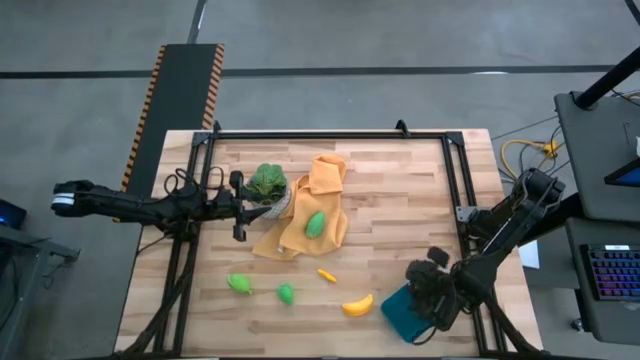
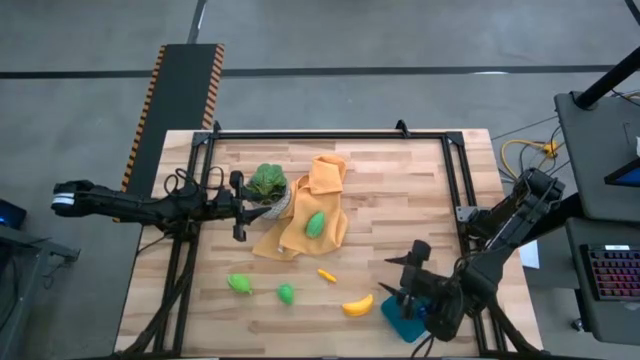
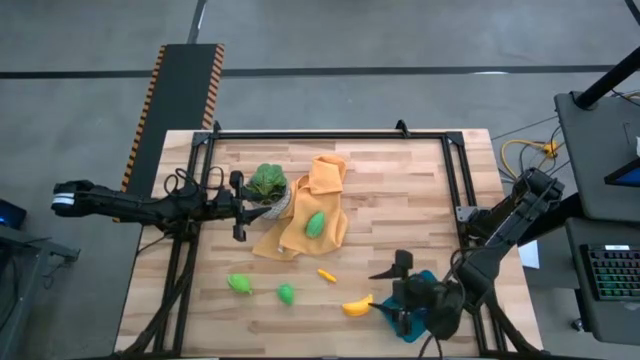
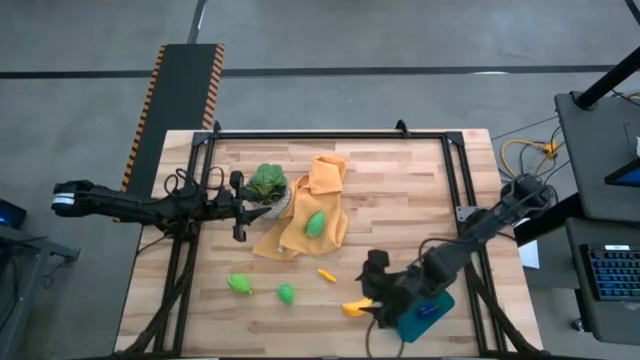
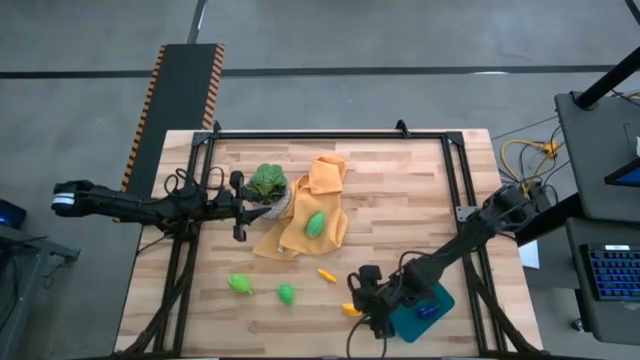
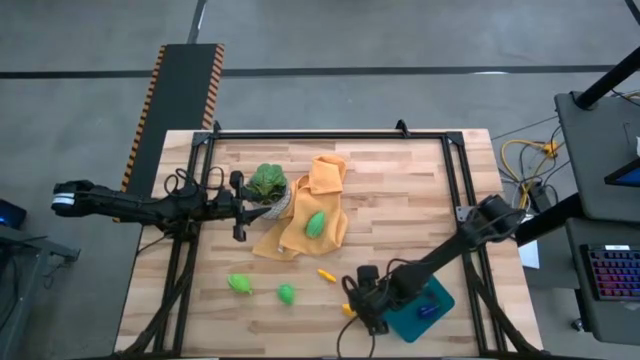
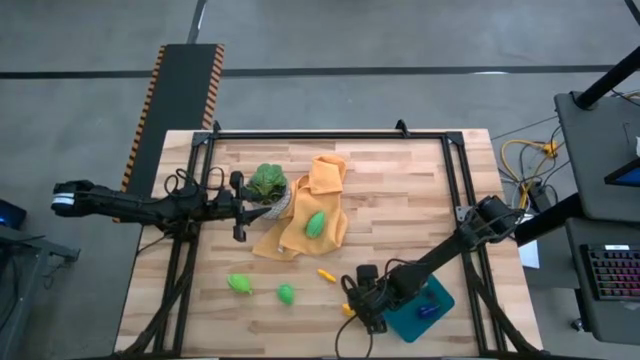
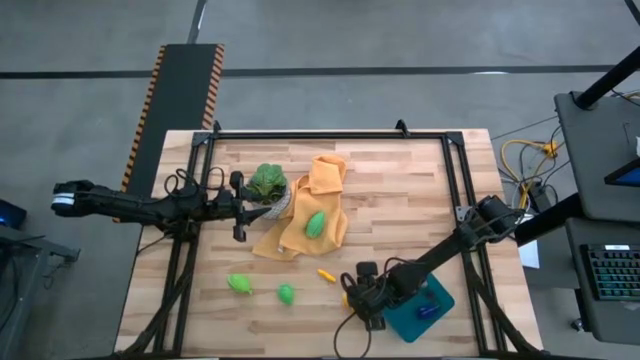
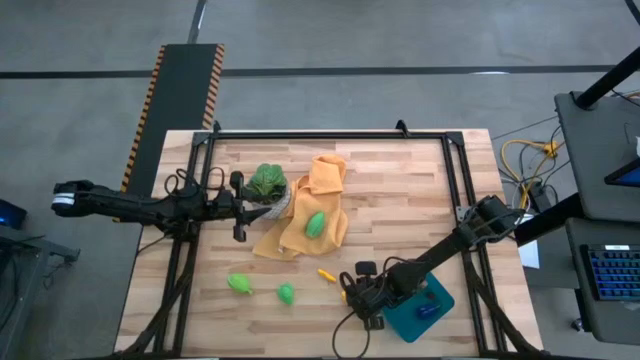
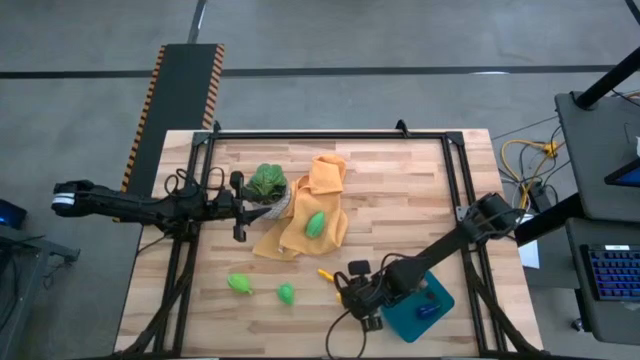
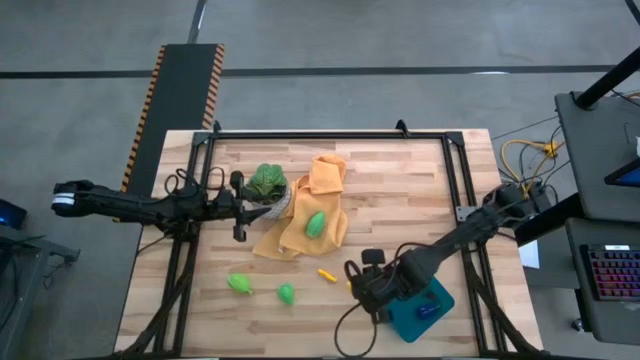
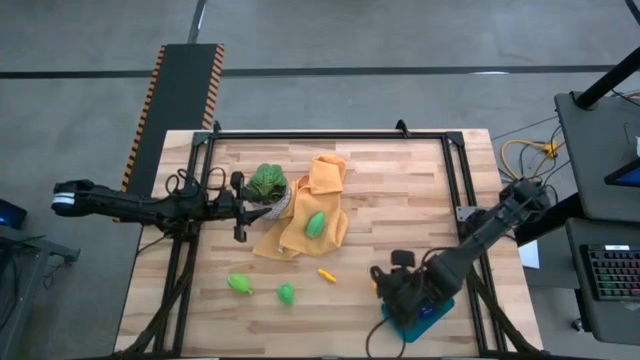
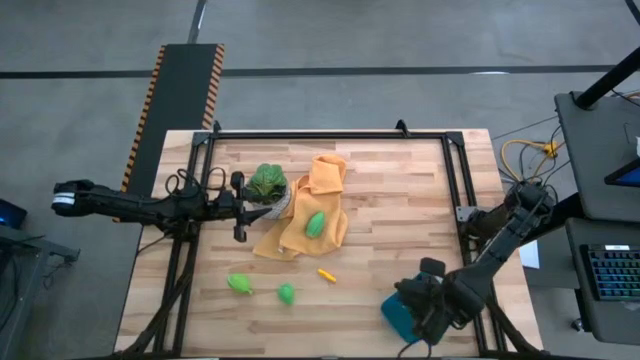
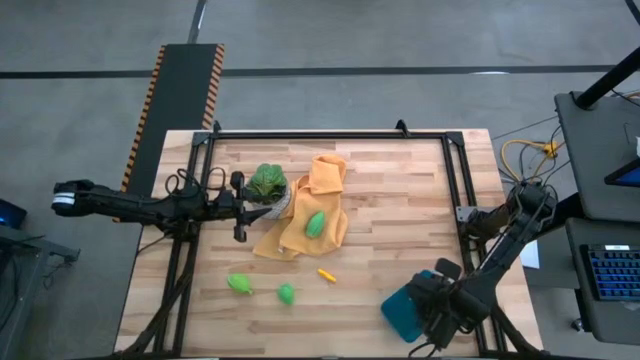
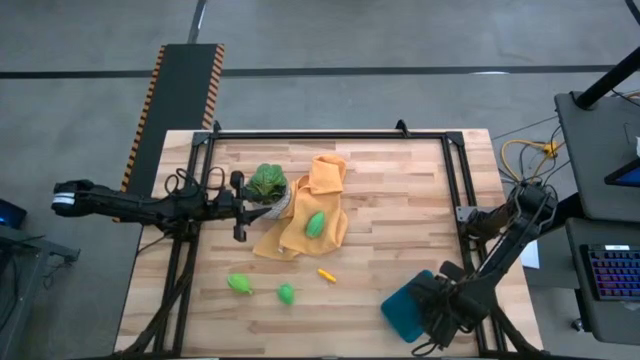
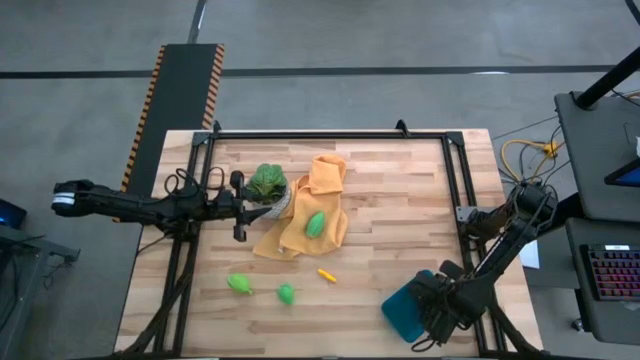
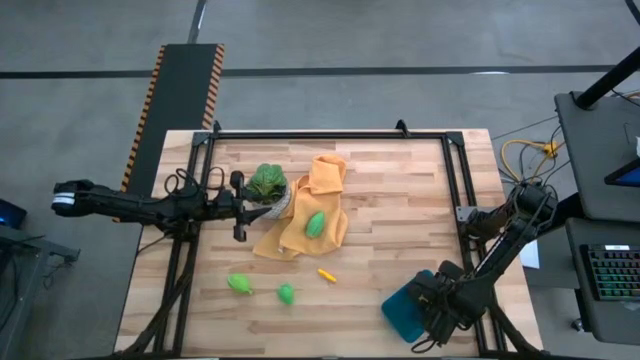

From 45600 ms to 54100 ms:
Task: Pick and placing Produce into tupperware
Put the banana into the blue bin

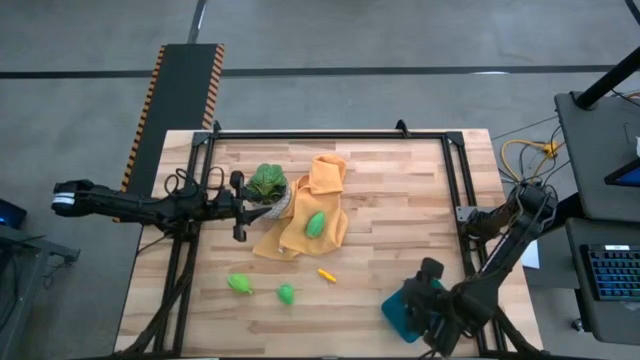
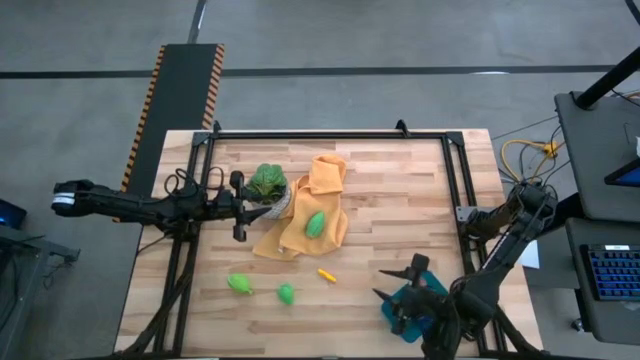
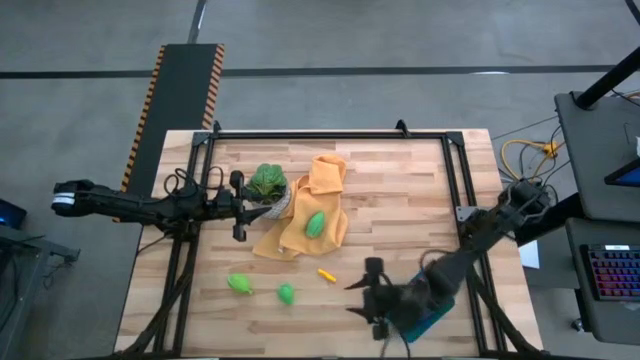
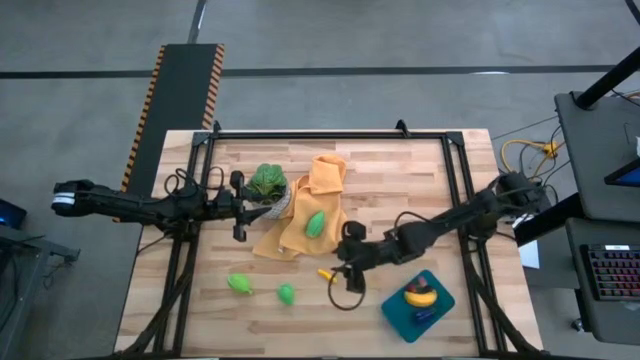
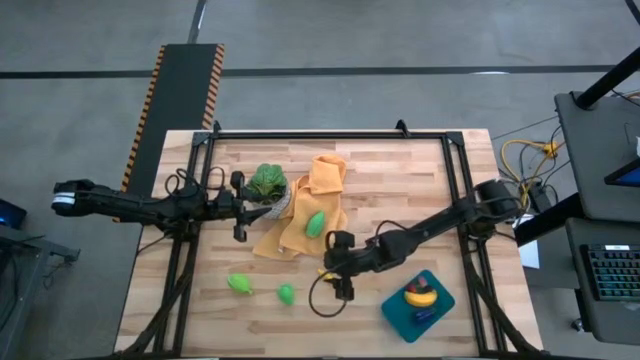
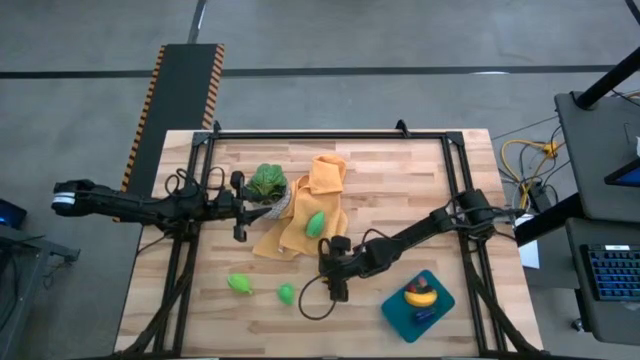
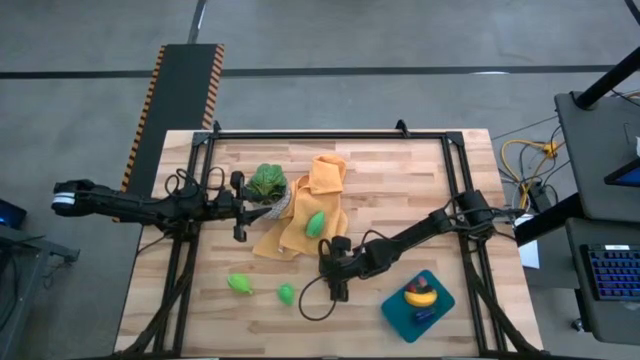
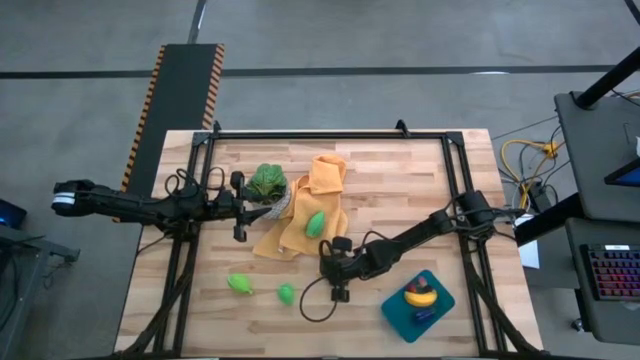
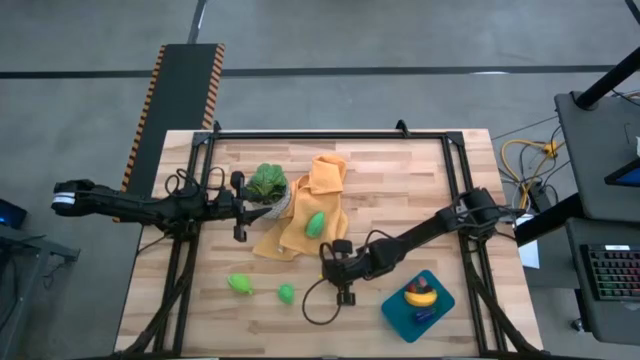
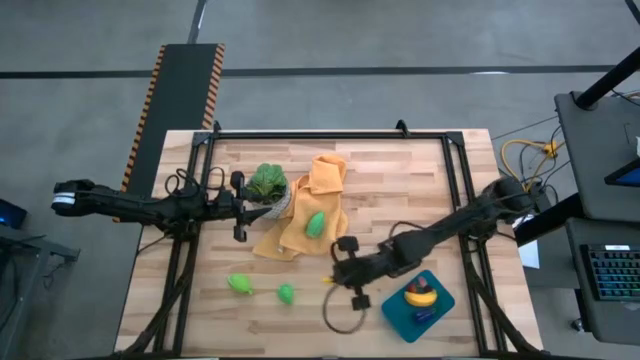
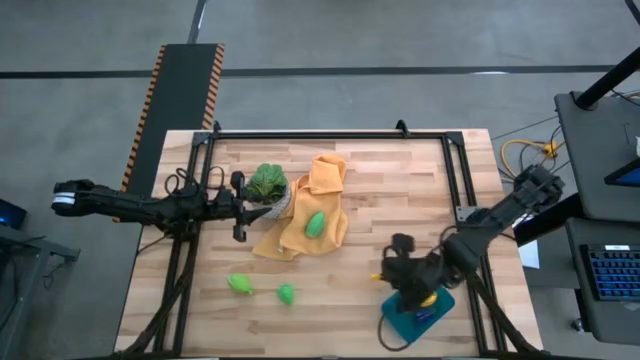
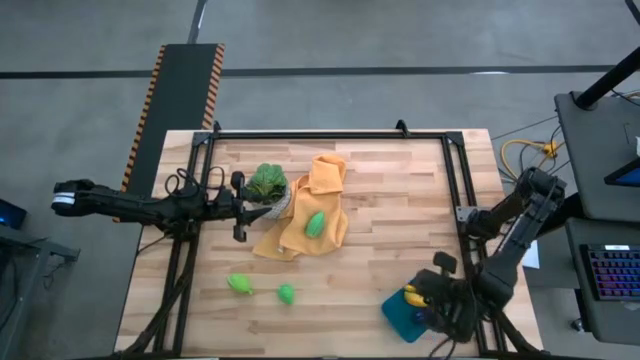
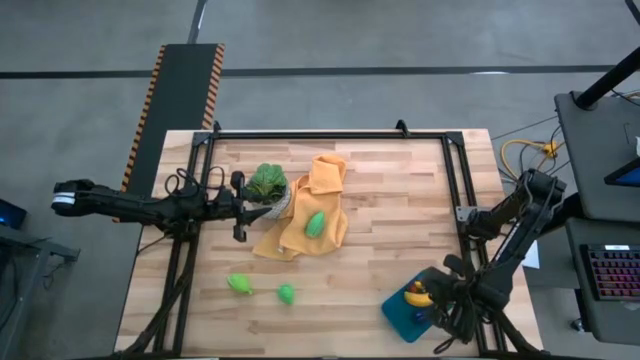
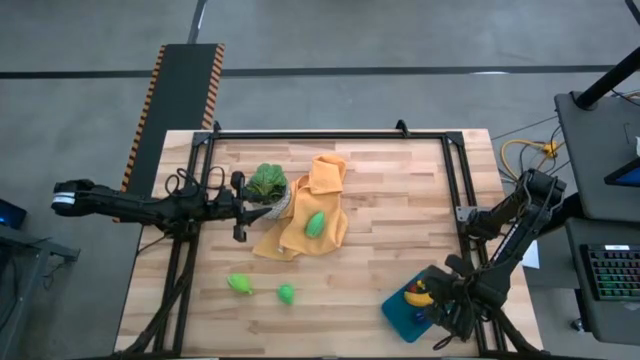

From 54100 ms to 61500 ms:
Put the small corn into the blue bin

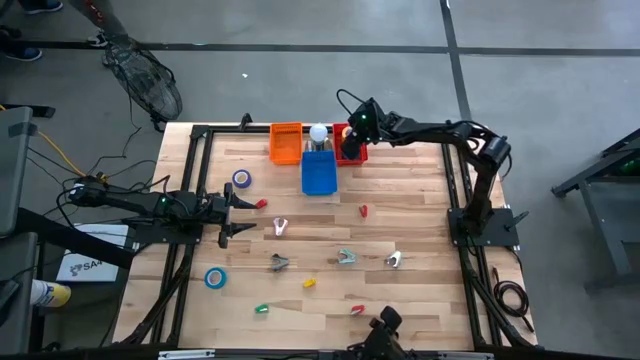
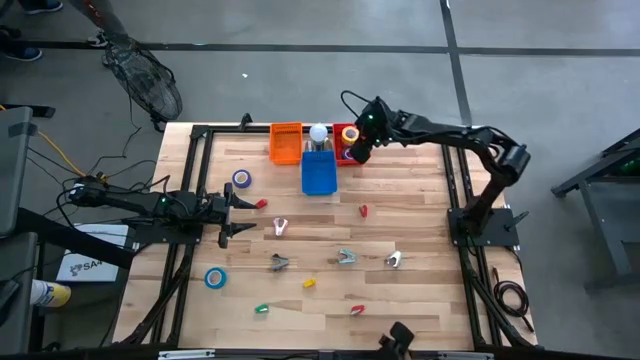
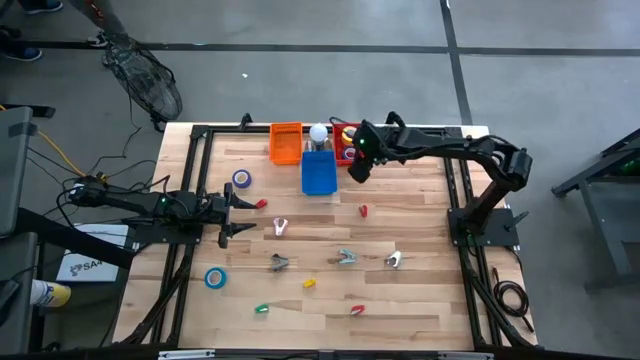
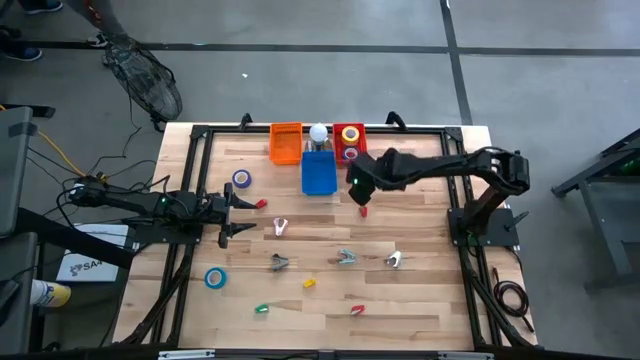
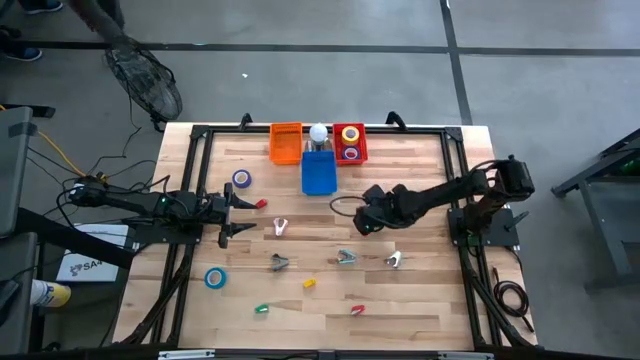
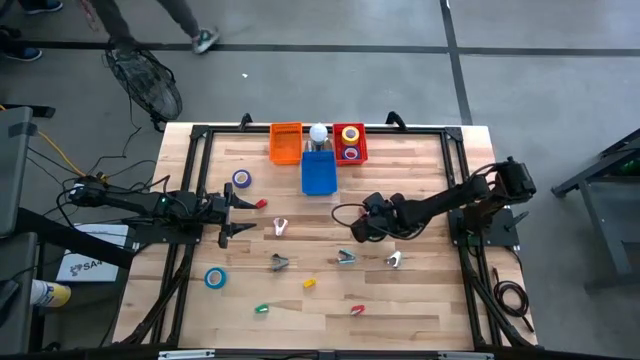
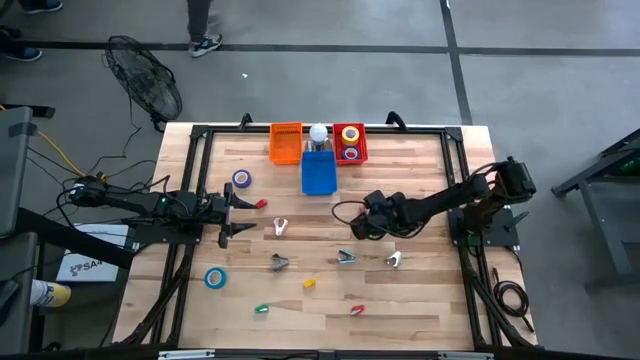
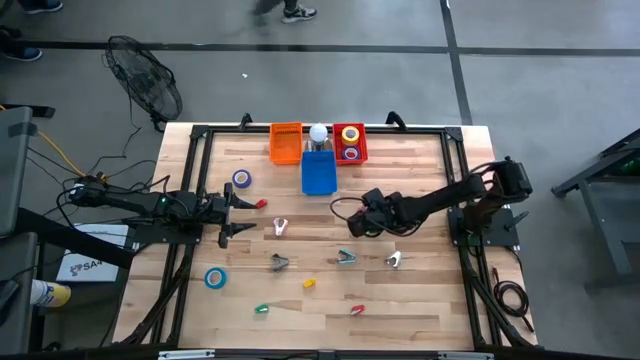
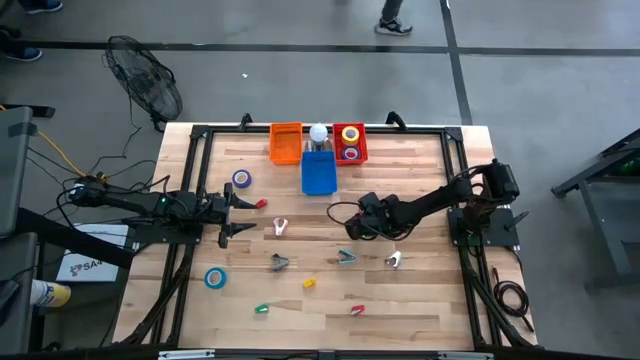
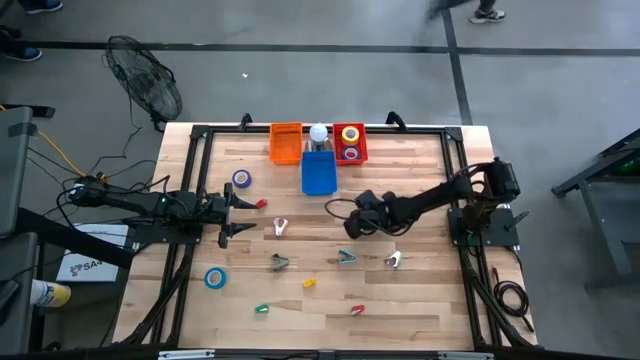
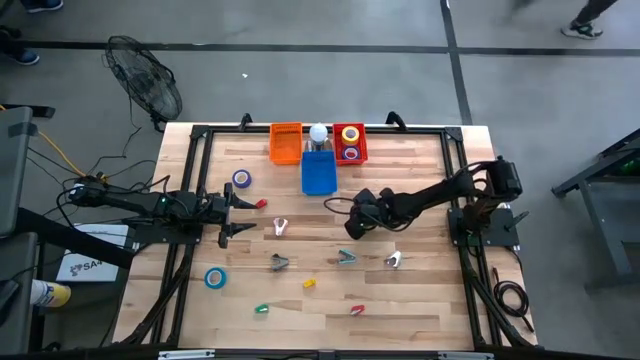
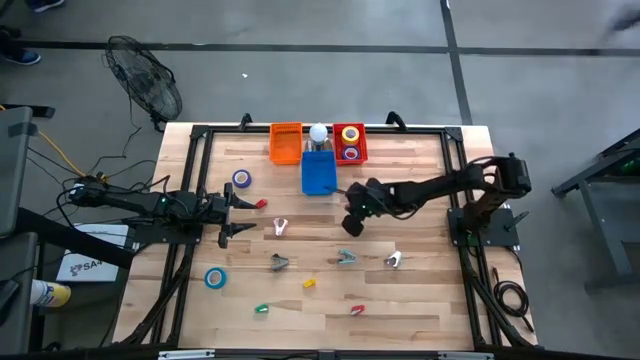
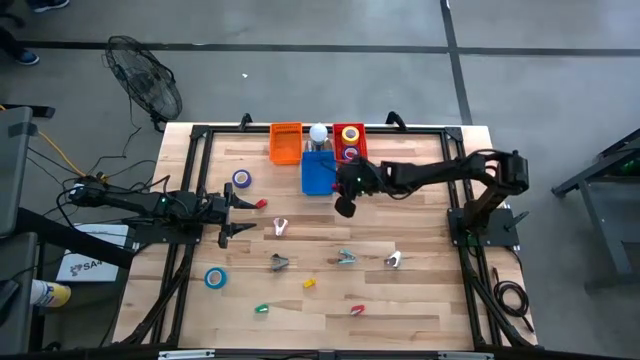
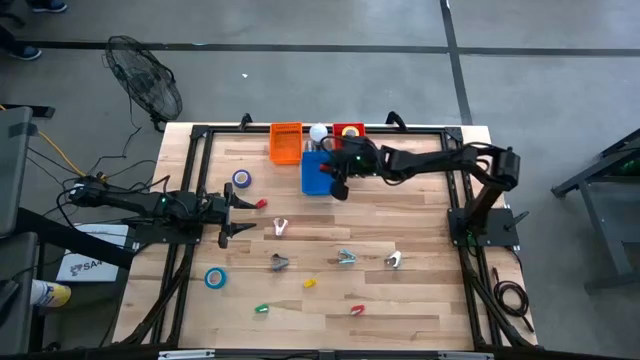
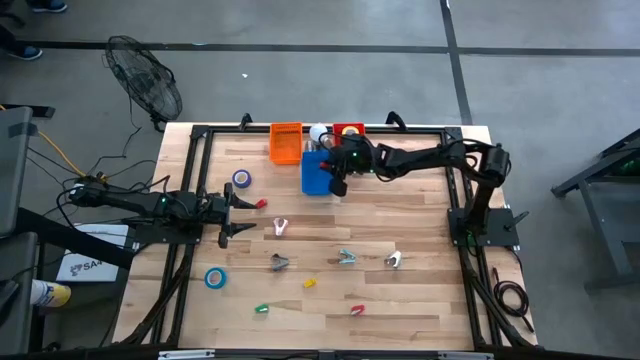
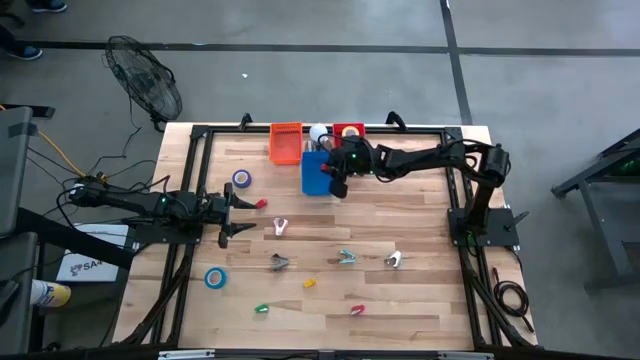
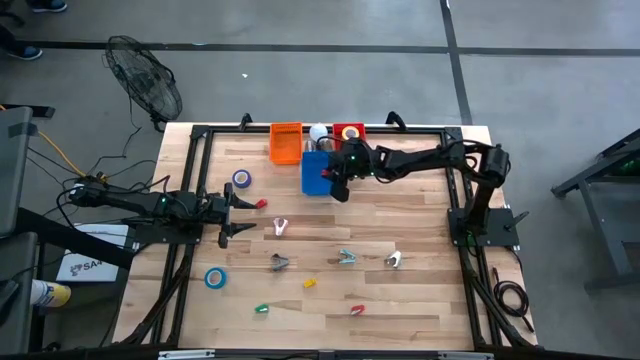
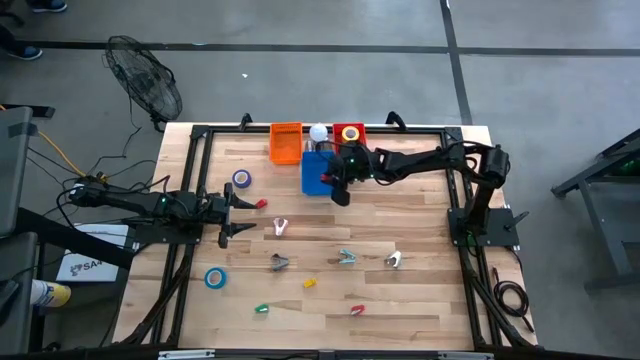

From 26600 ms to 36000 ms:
Task: Pick and place Stapler, Stapler remover, tape
Put the top right red stapler into the blue basket
